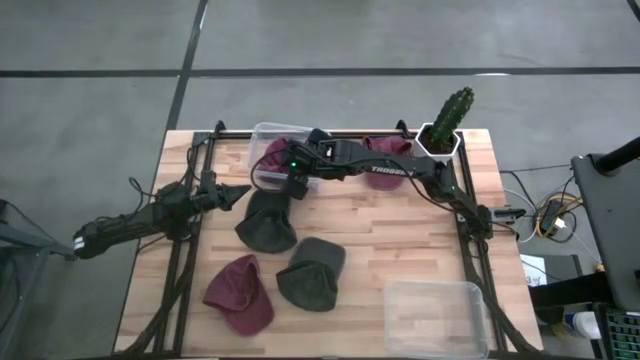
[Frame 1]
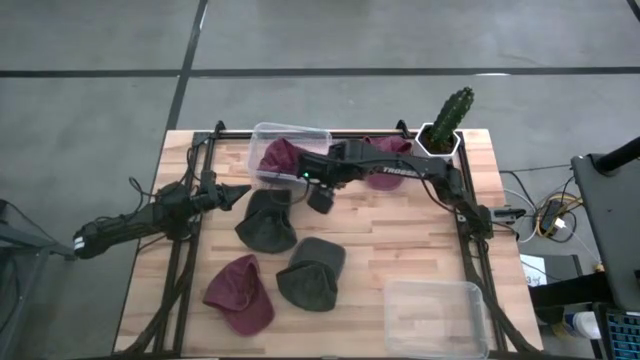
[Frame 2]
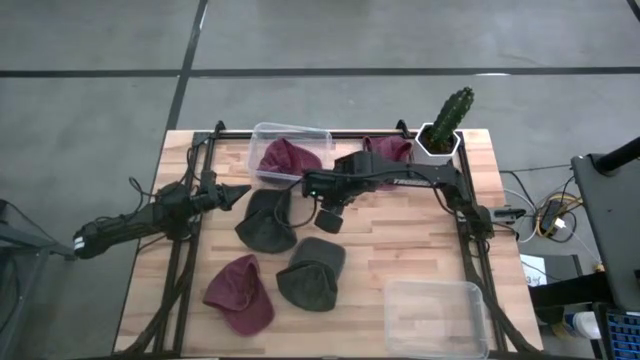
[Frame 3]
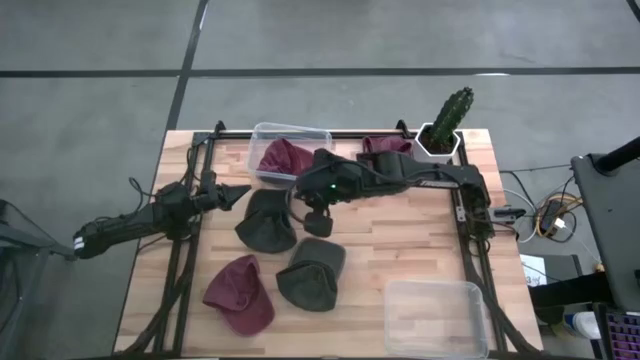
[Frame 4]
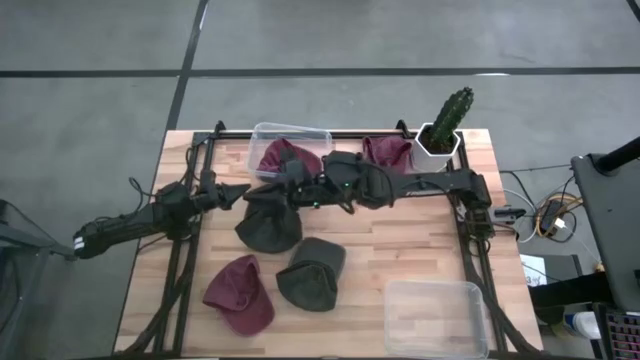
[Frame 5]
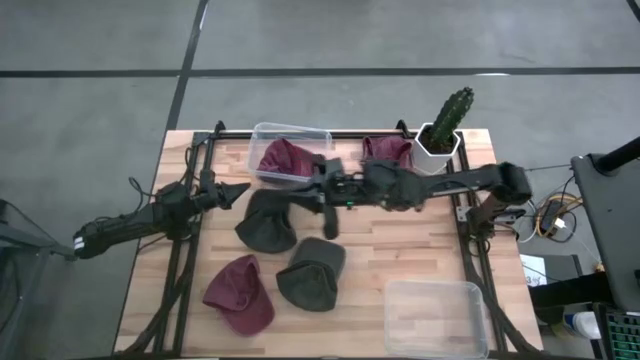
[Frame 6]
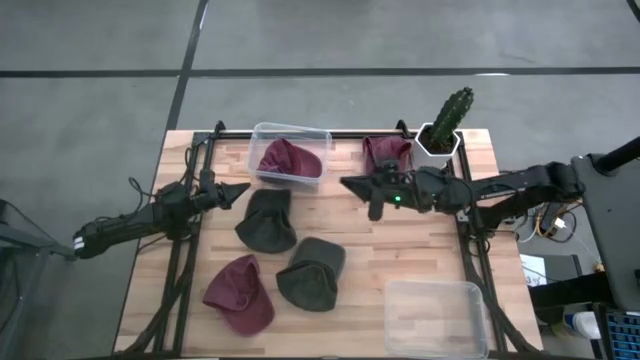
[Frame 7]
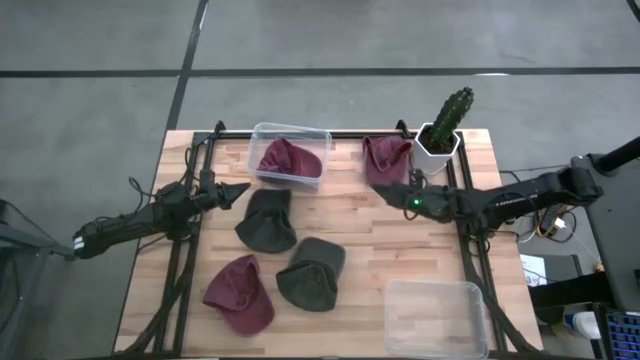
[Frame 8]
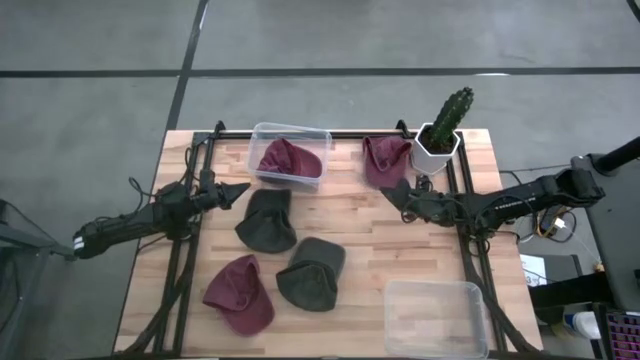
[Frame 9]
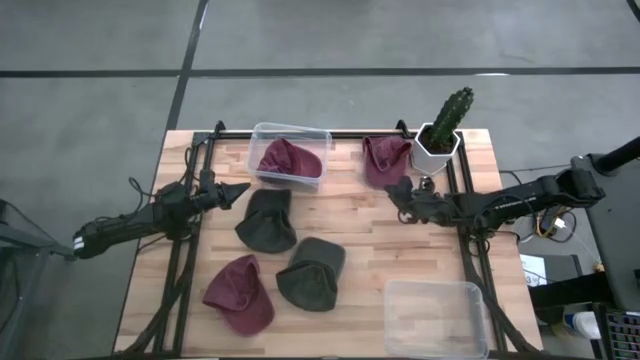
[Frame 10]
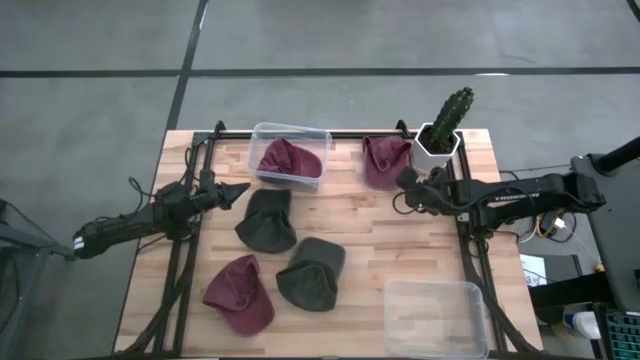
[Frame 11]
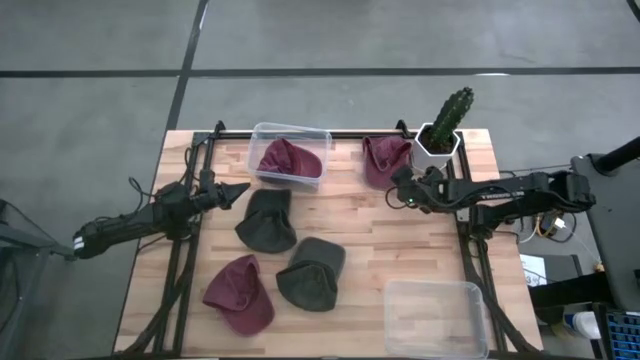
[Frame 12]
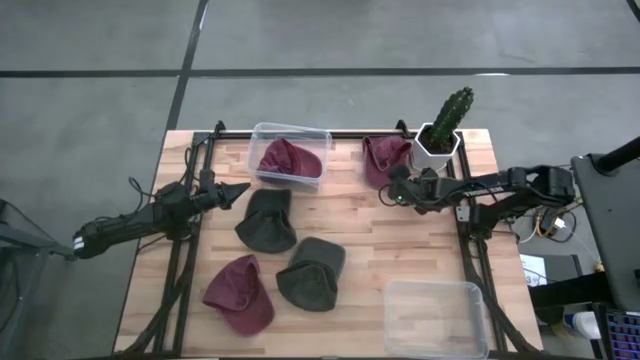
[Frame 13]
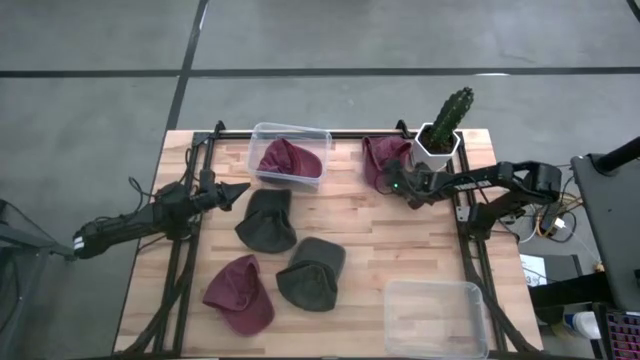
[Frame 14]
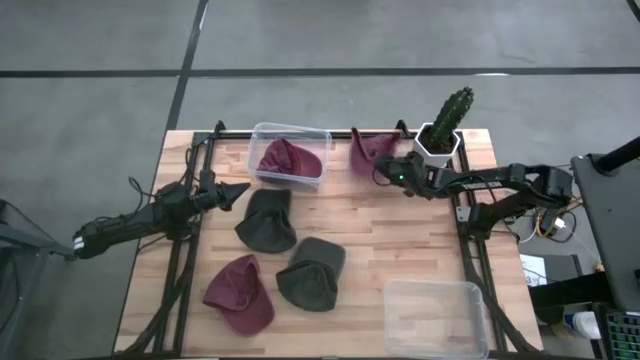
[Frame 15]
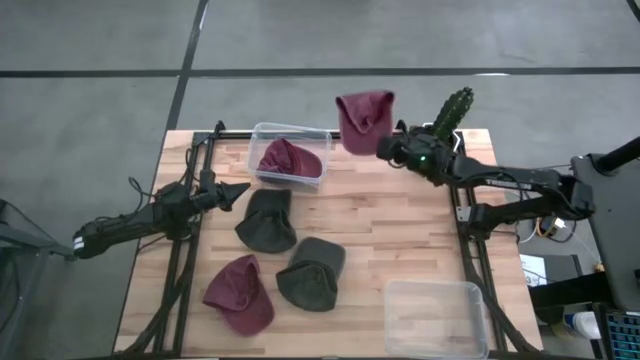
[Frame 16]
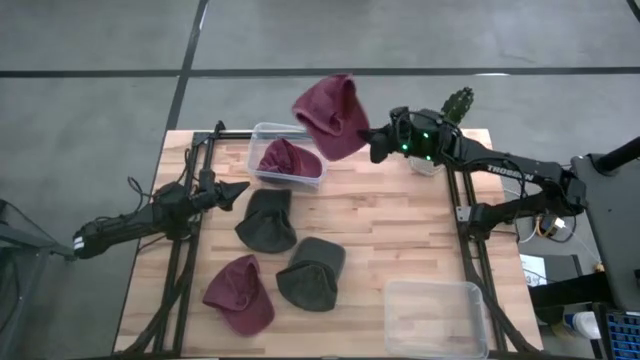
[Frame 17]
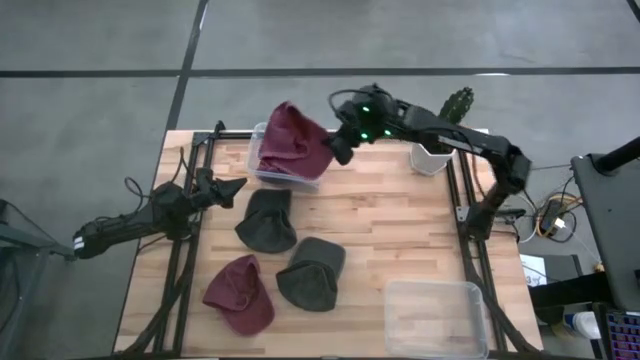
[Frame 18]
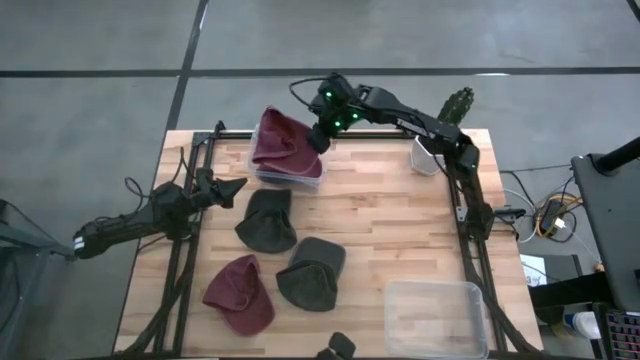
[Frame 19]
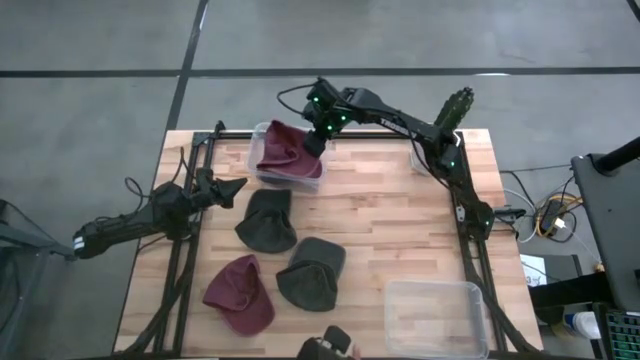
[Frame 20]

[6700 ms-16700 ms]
Task: Pick and place caps into container
Put the top red cap into the top transparent container

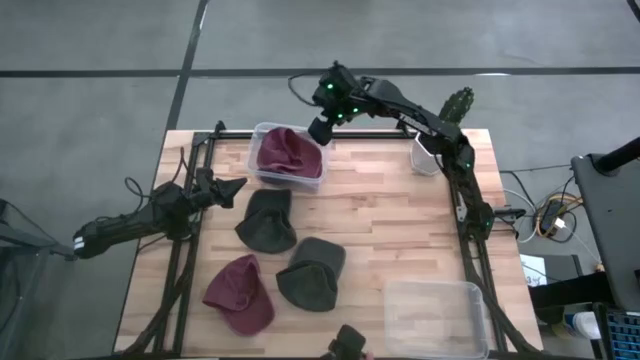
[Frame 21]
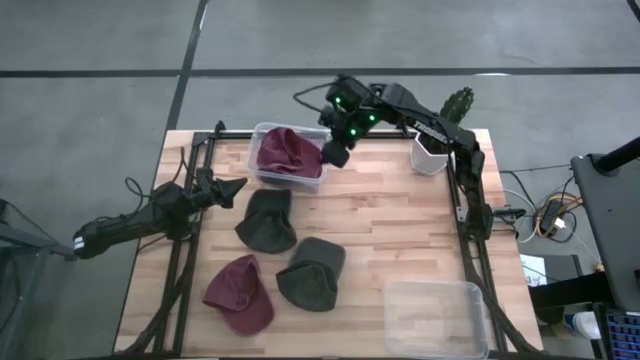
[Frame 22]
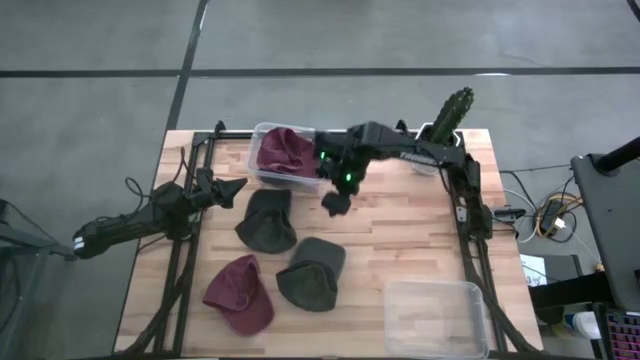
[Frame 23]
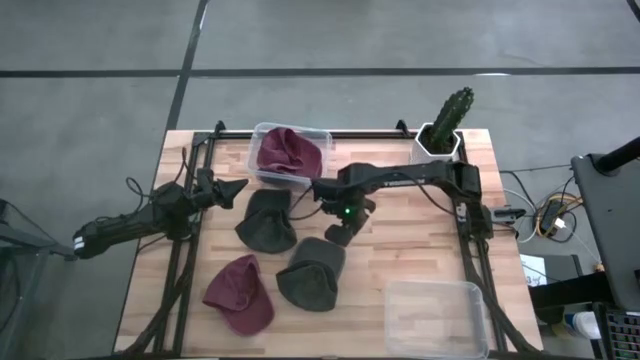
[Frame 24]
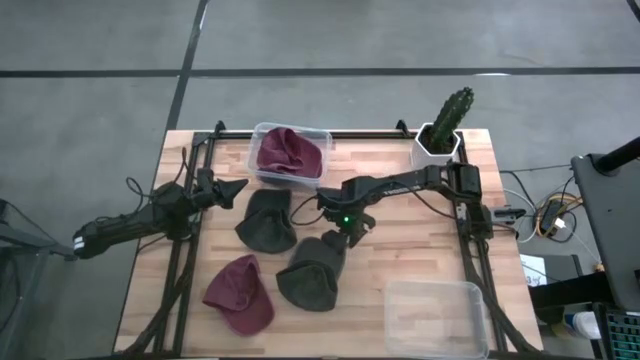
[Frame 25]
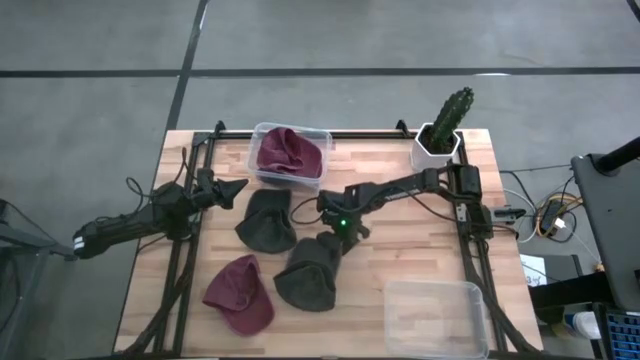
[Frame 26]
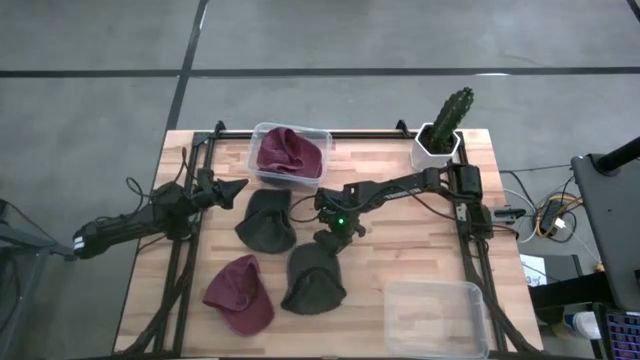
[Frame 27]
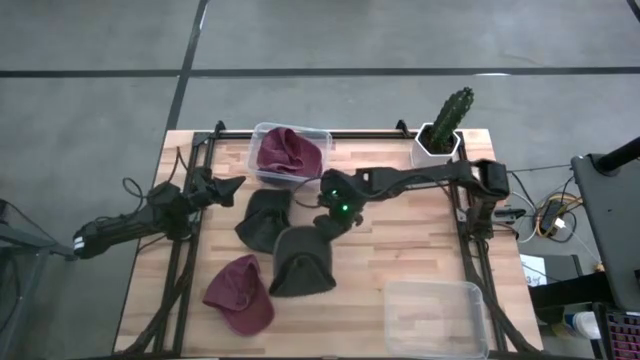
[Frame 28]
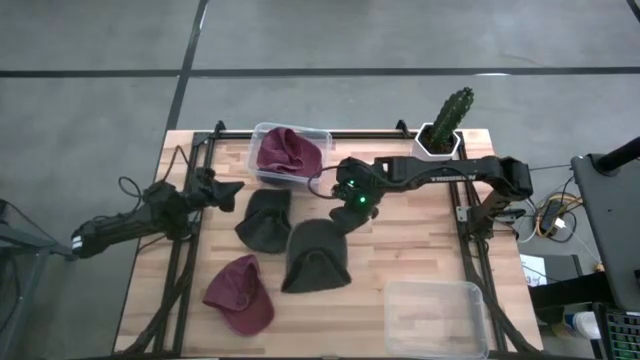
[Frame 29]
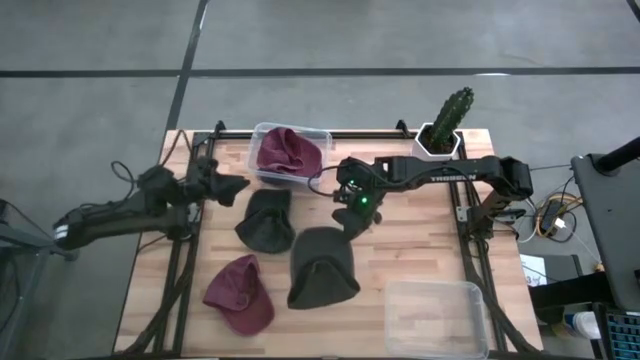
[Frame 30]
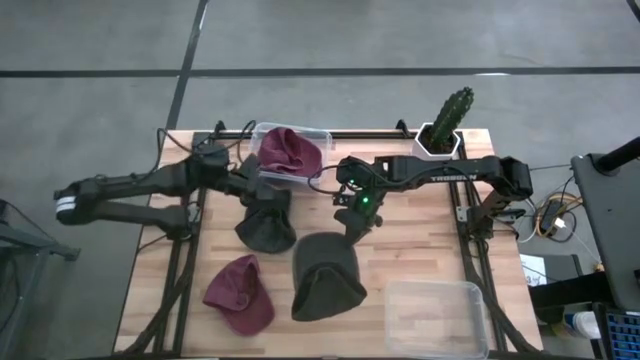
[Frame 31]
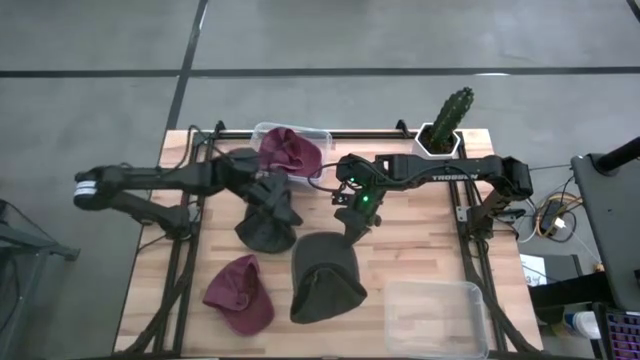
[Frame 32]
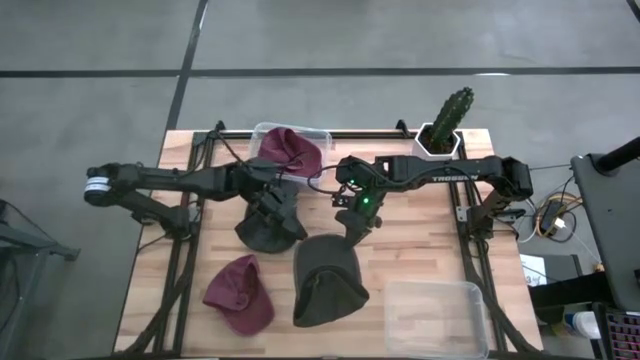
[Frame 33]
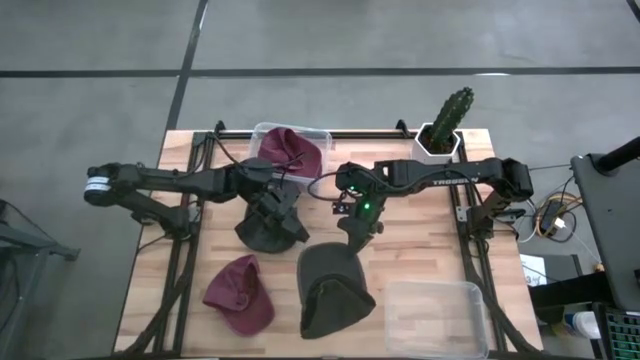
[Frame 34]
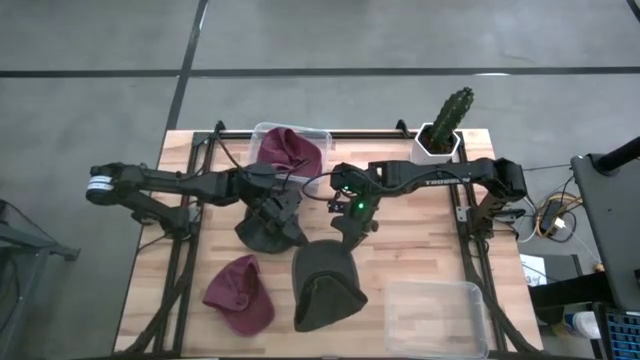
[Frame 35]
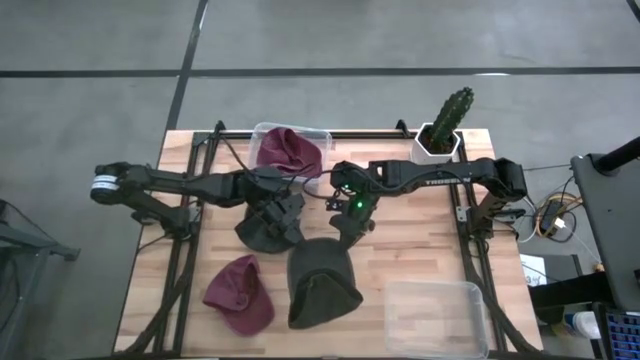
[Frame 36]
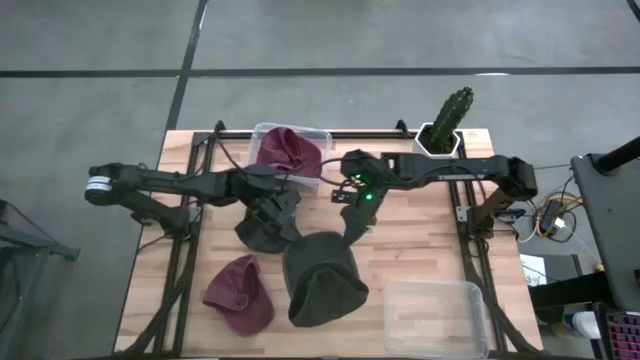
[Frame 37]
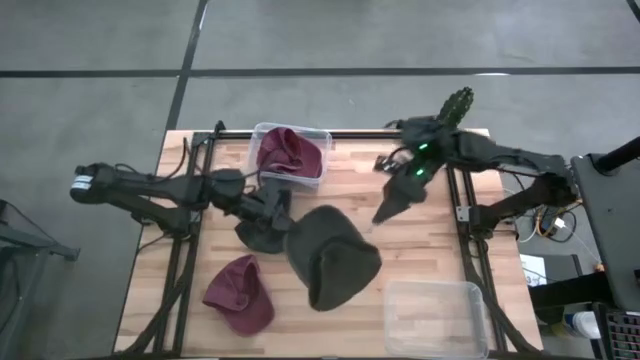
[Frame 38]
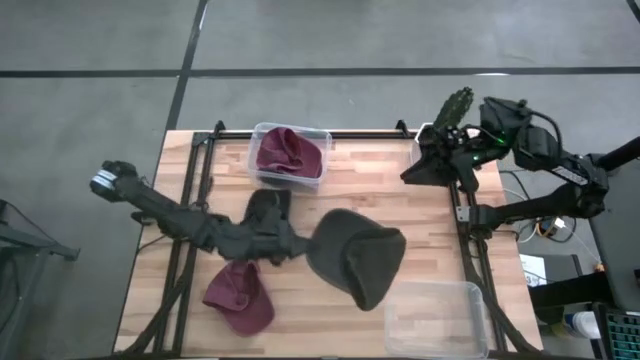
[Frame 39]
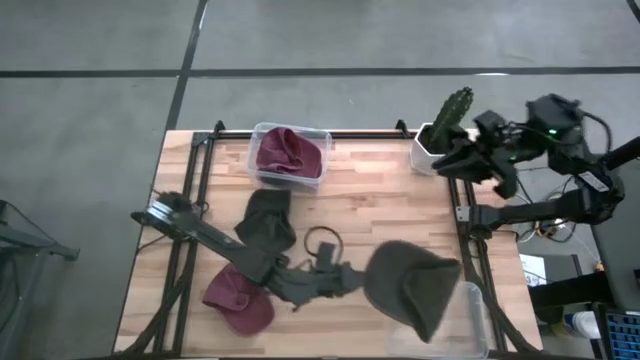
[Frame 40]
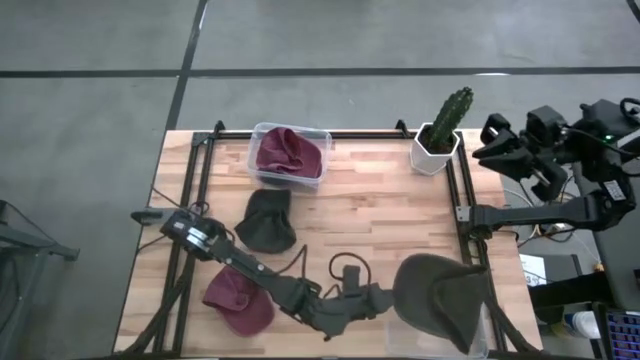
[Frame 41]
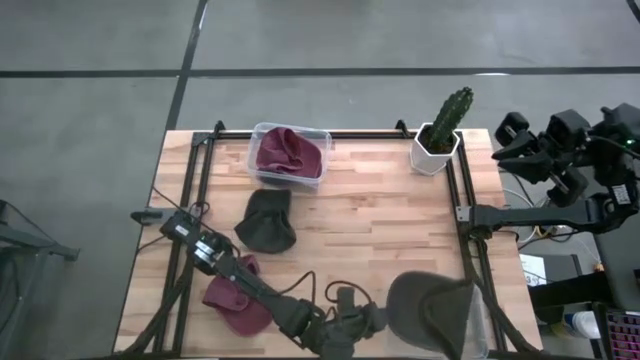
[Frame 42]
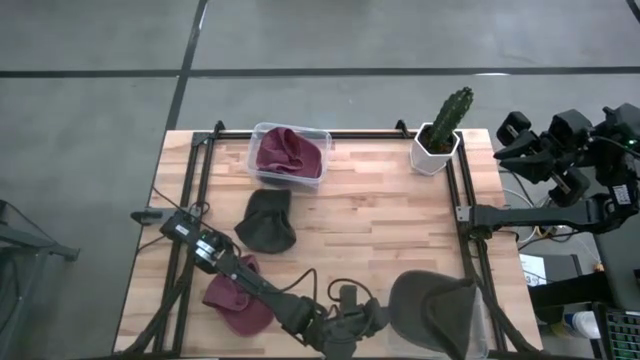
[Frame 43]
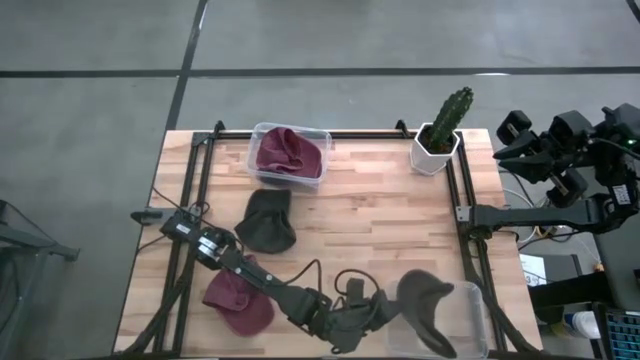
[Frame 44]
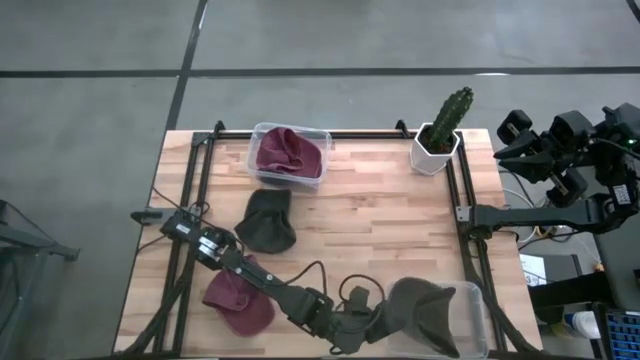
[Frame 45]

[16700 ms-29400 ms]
Put the bottom black cap into the bottom transparent container
